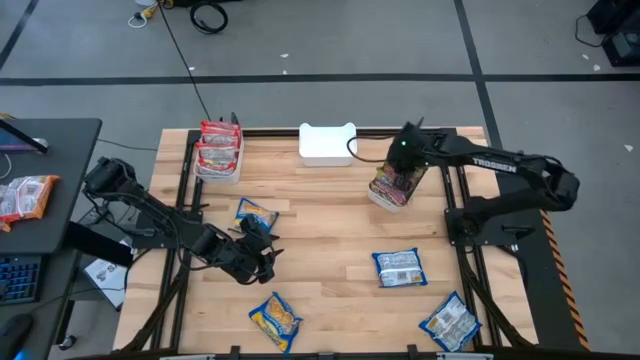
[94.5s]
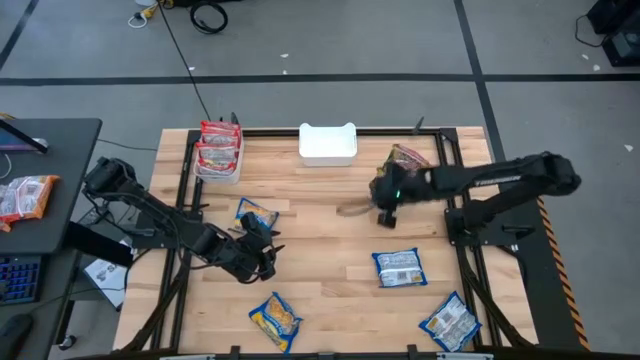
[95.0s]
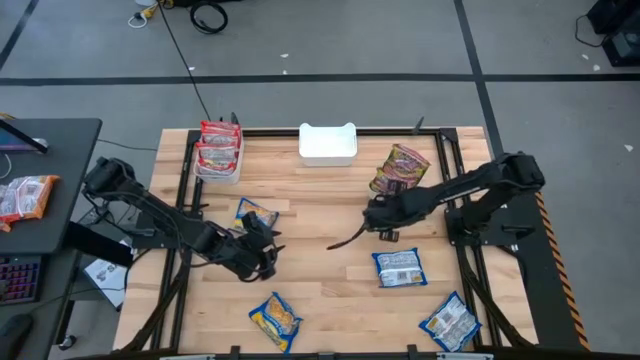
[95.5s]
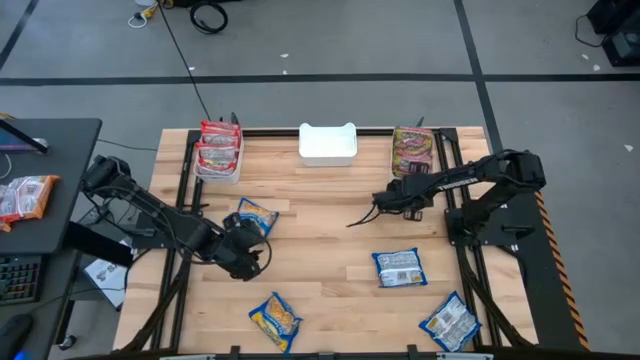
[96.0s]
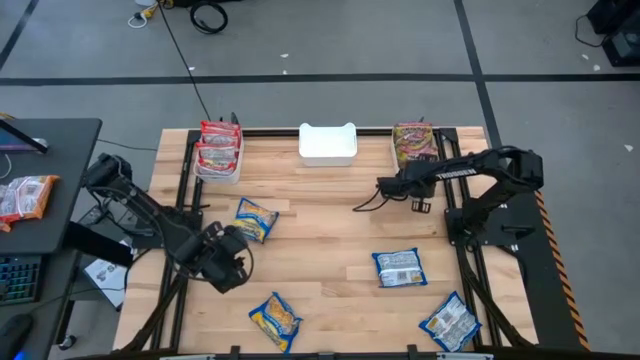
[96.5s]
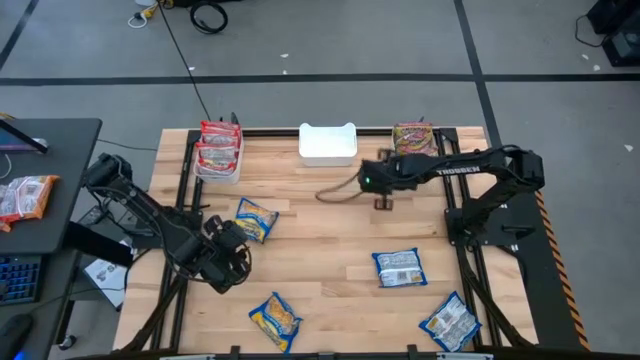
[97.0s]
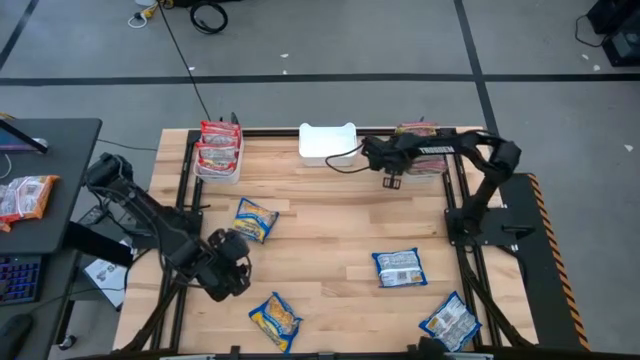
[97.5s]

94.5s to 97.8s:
Task: Sort Maruchan noodles
Adjust the right white bin

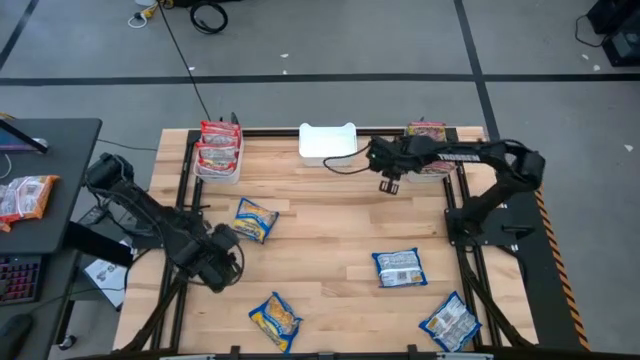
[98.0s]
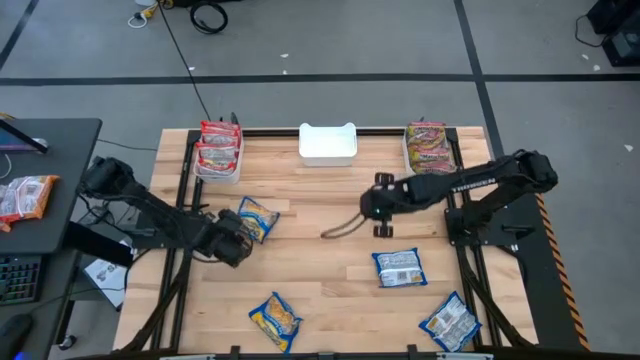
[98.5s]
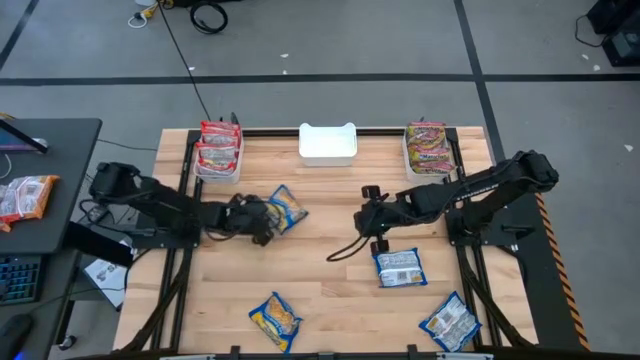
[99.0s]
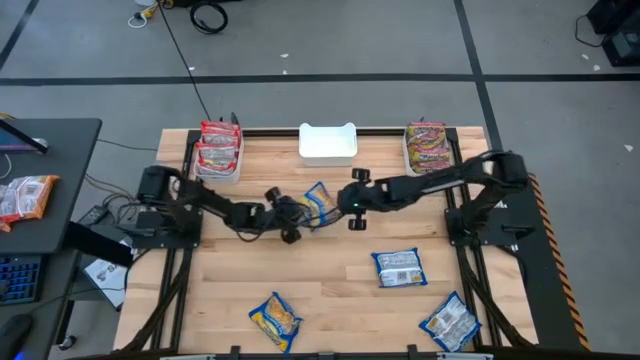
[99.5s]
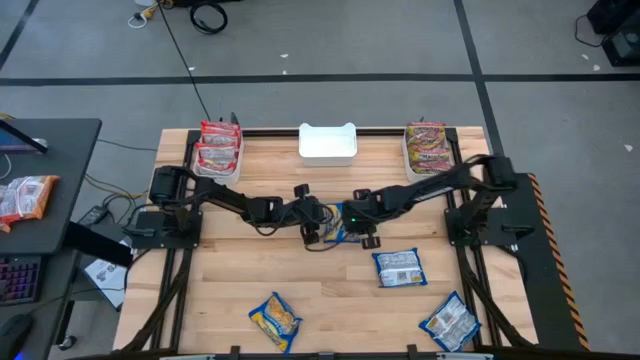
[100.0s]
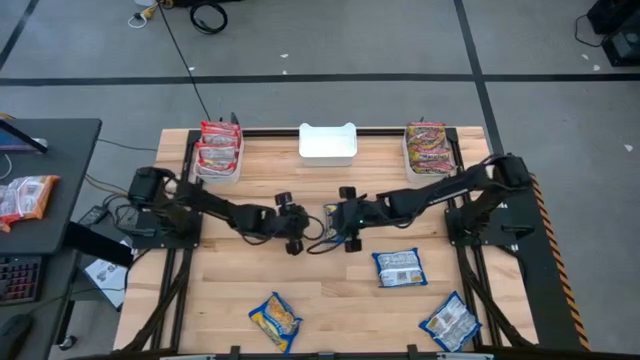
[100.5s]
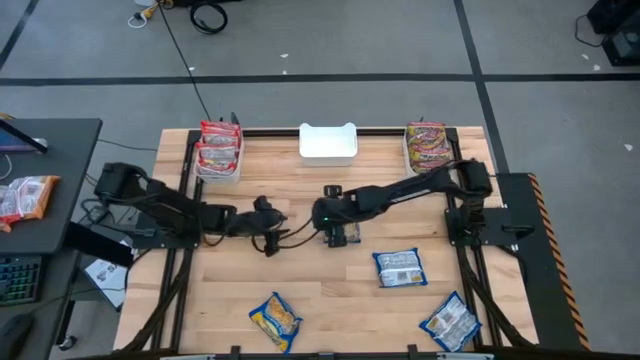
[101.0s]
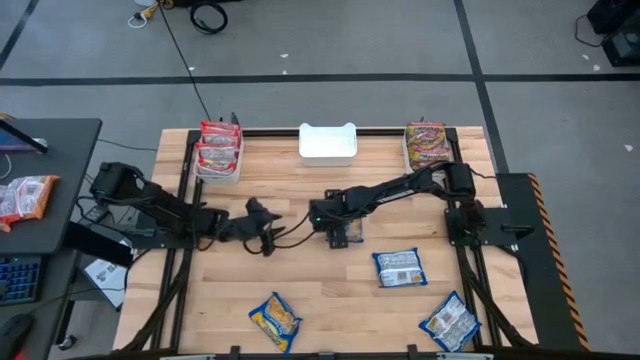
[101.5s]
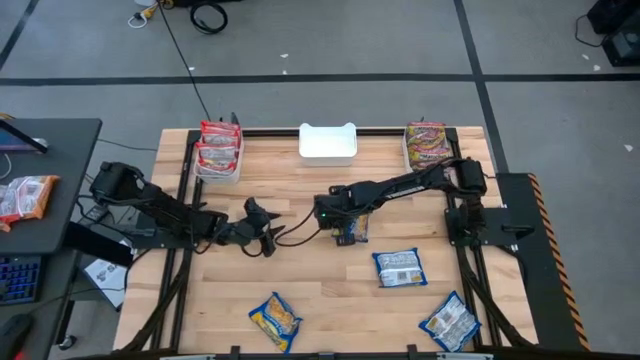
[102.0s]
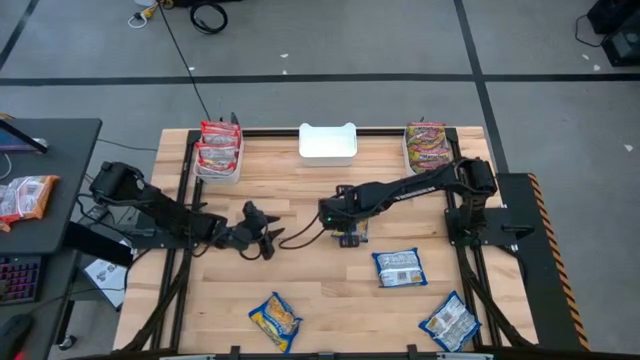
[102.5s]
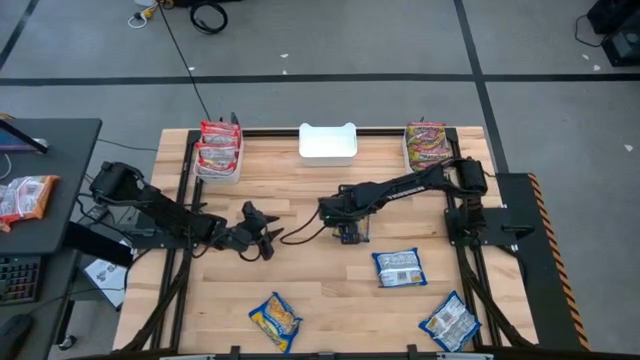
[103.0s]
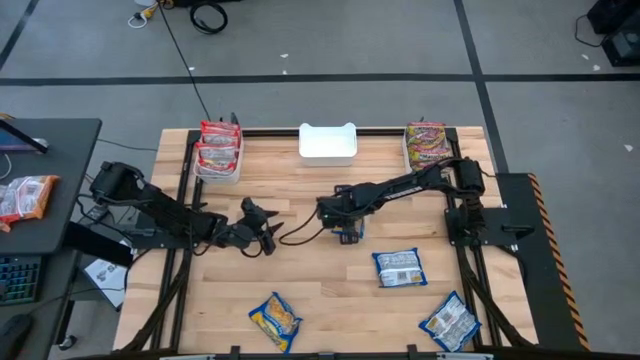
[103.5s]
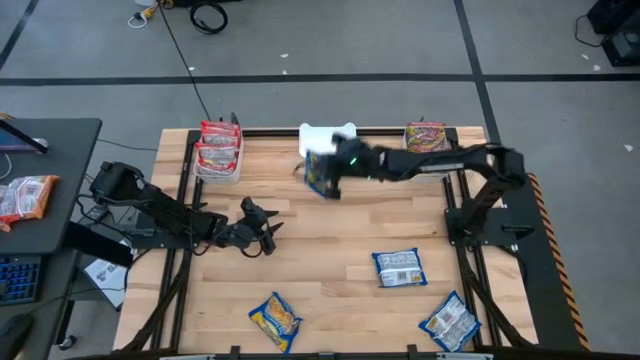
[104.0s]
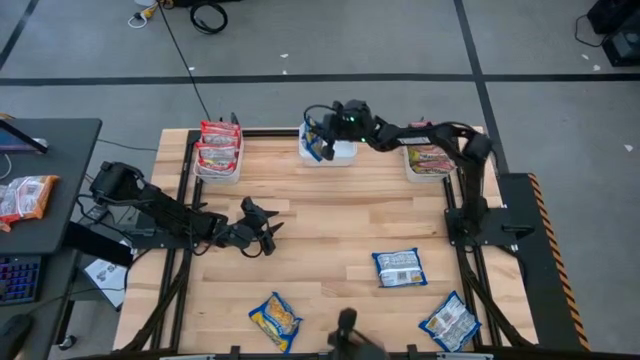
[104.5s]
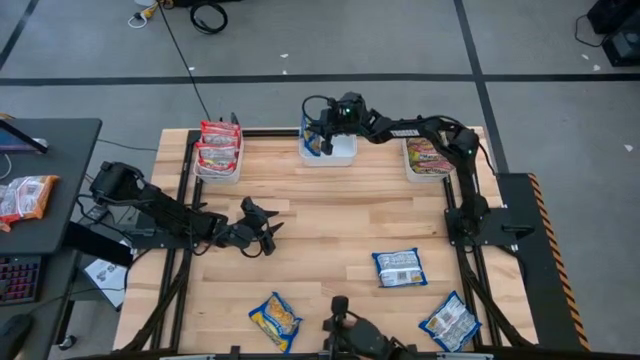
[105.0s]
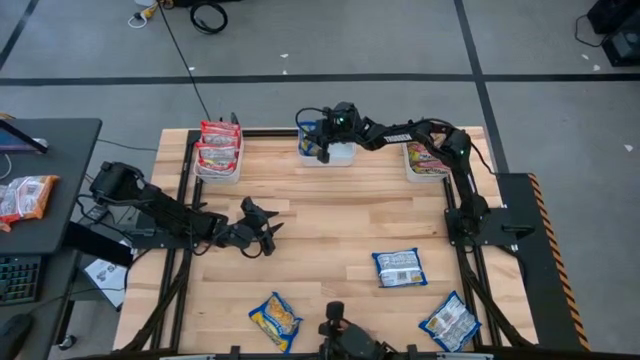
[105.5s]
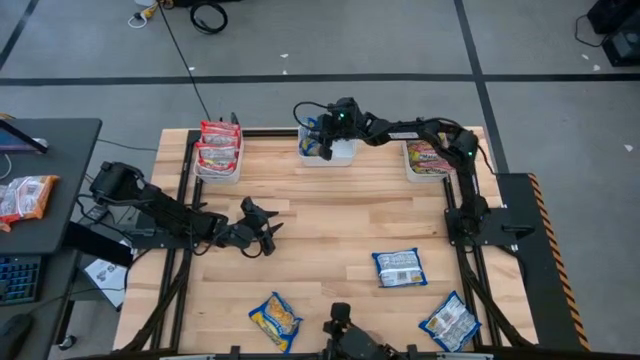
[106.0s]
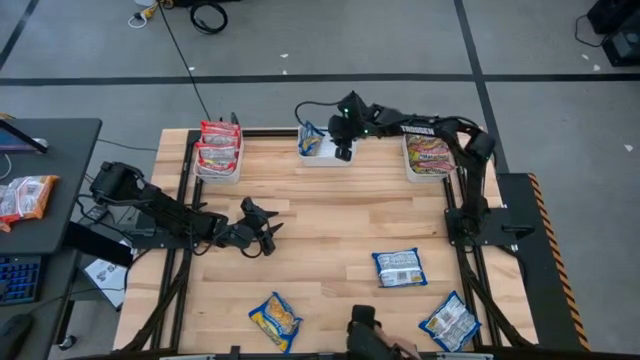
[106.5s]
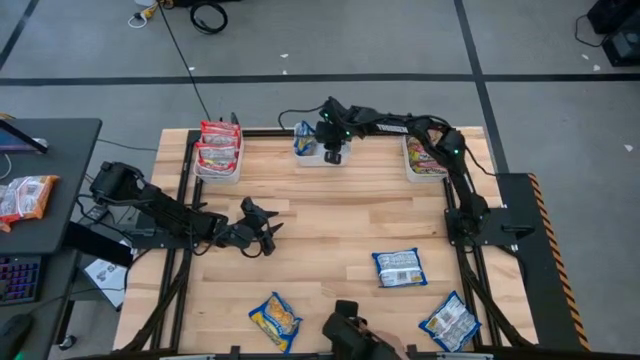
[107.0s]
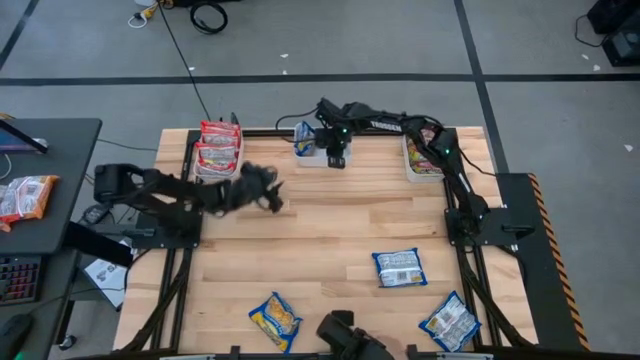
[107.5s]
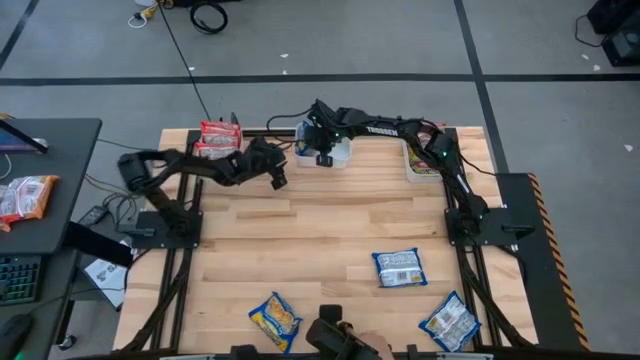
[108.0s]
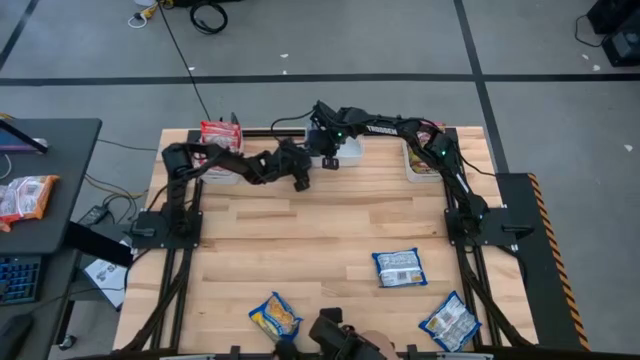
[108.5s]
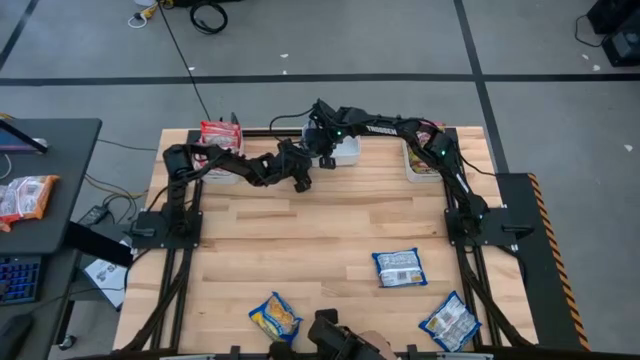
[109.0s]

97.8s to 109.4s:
Put the blue noodle pack into the middle white bin

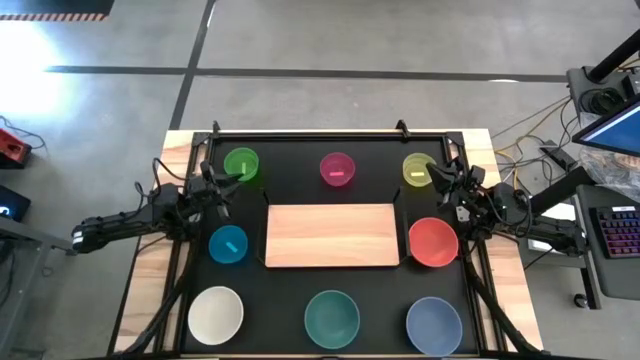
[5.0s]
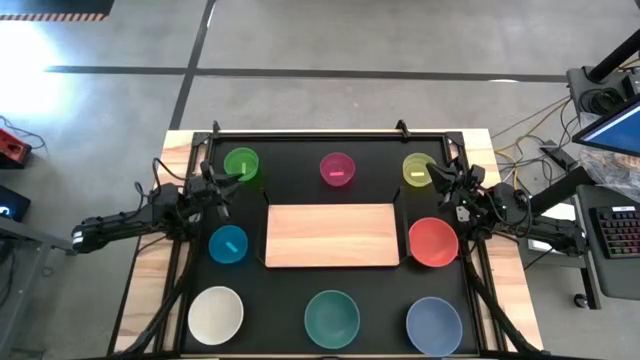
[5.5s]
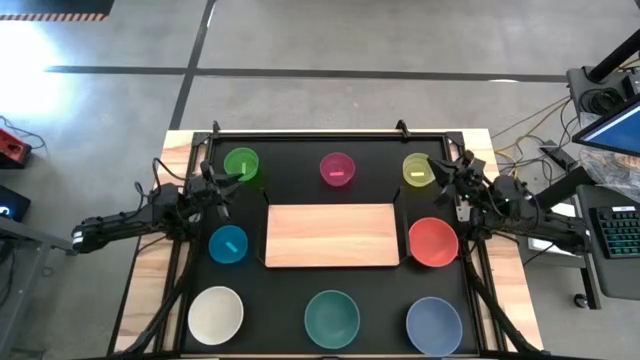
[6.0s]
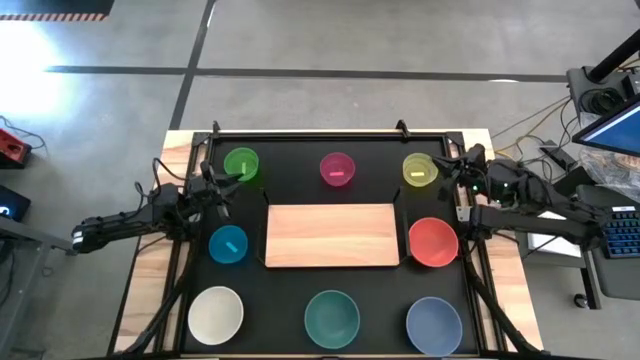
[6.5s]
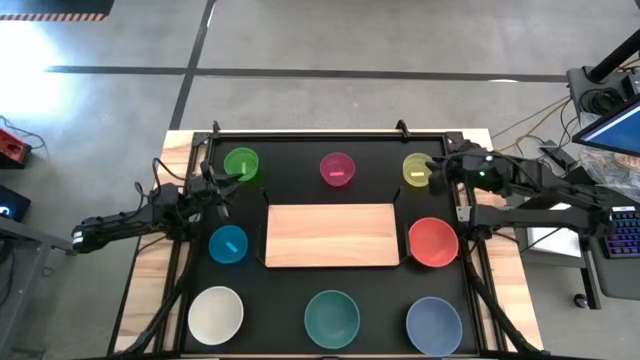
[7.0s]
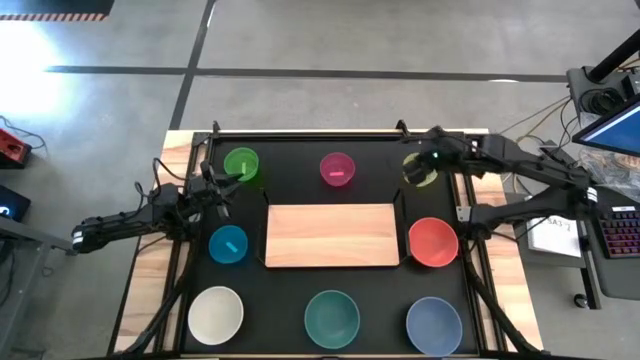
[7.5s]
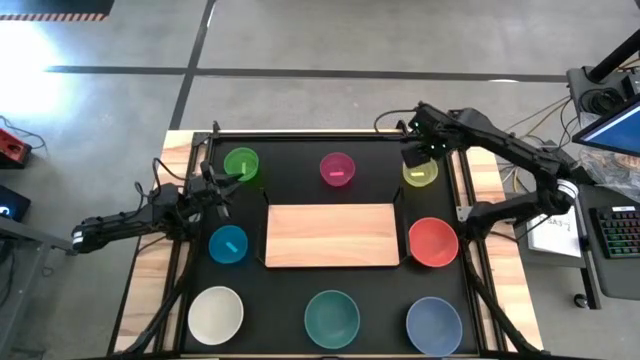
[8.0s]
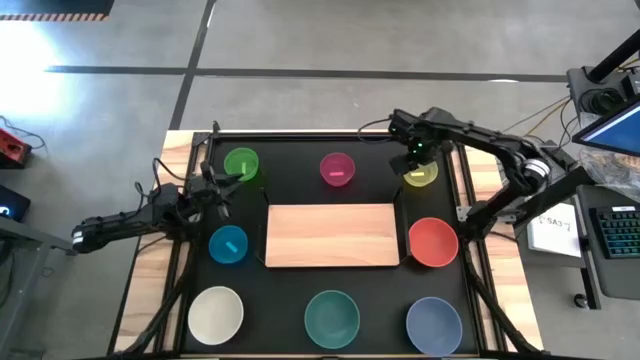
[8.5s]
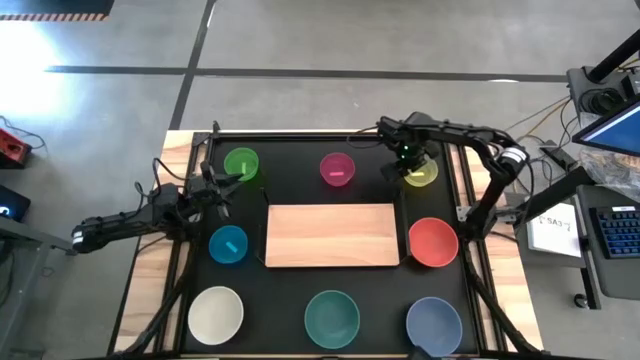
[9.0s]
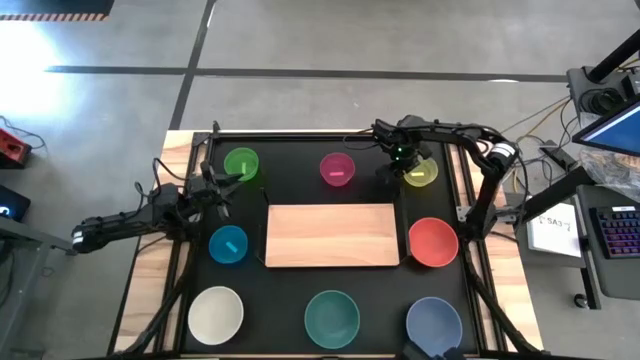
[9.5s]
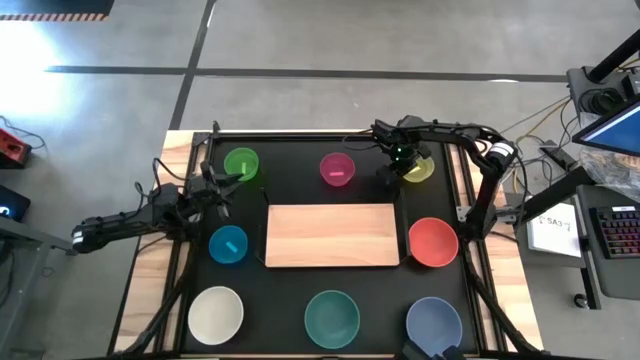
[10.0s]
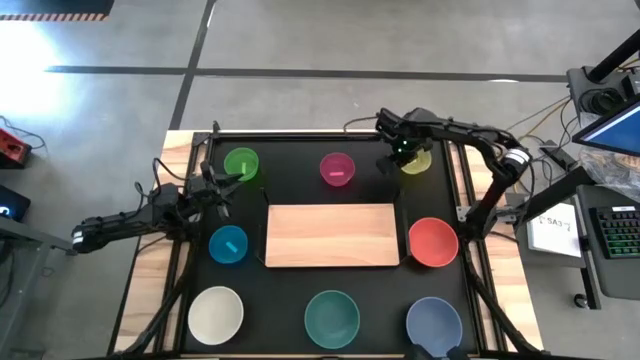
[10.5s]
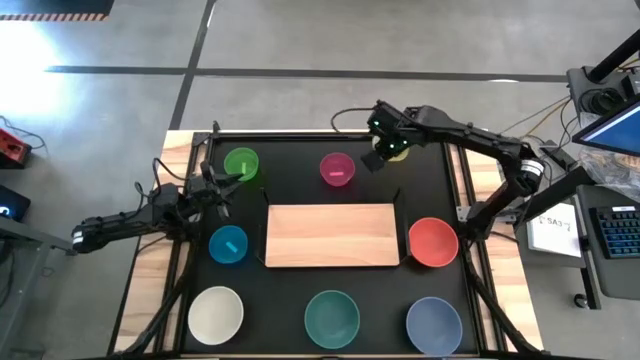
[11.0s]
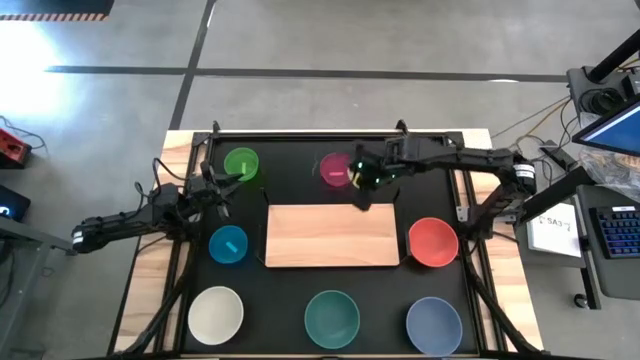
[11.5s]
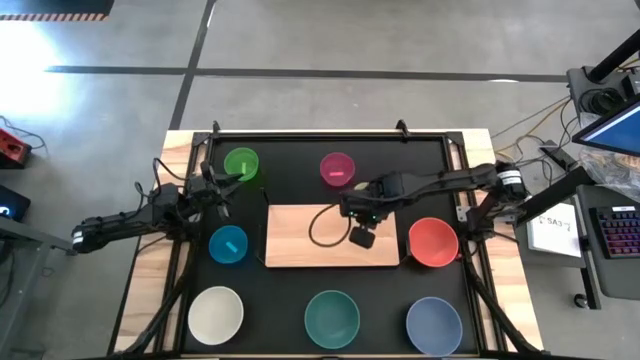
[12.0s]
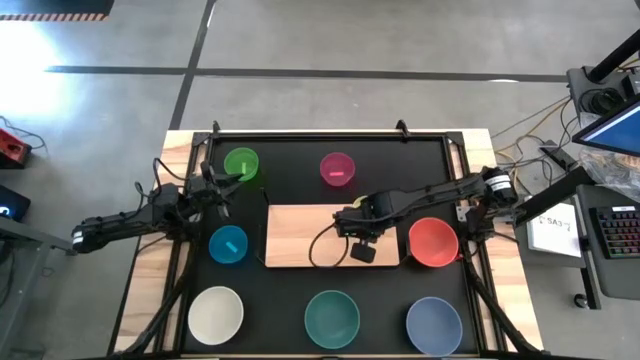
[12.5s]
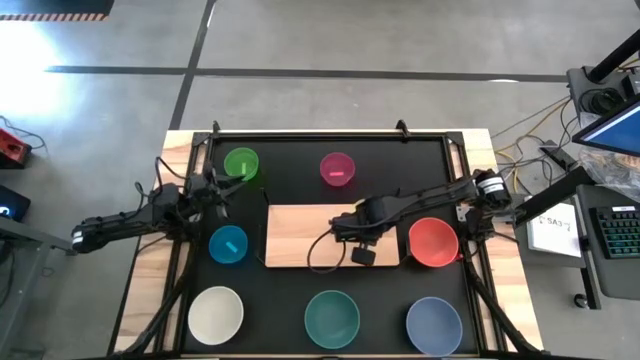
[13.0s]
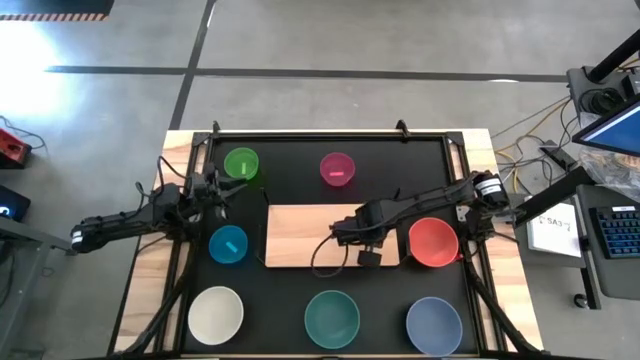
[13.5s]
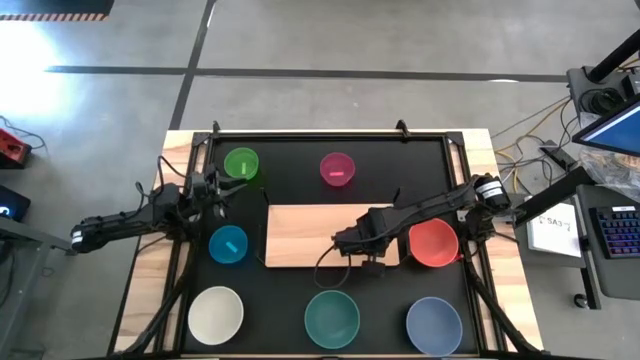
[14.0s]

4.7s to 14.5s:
Task: Place and stack bowls onto a shelf
Put the yellow bowl on the shelf
